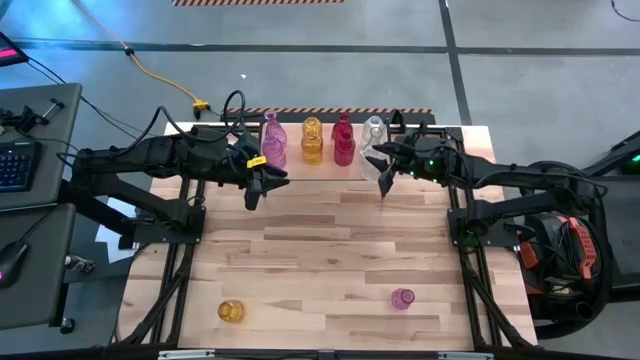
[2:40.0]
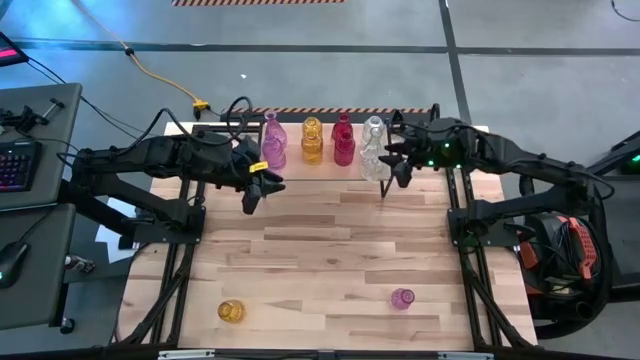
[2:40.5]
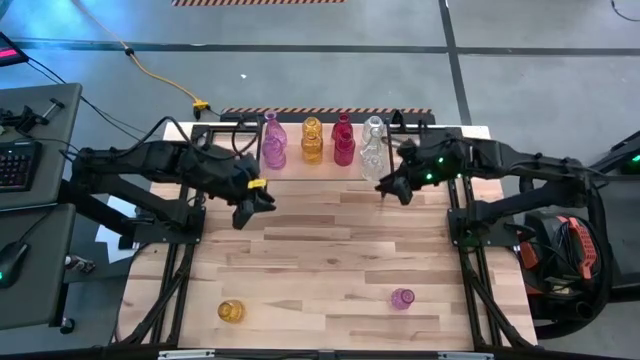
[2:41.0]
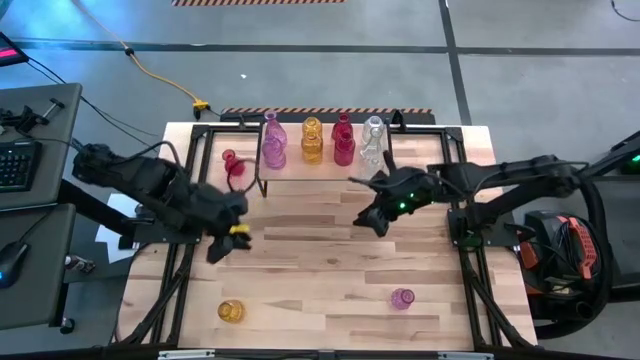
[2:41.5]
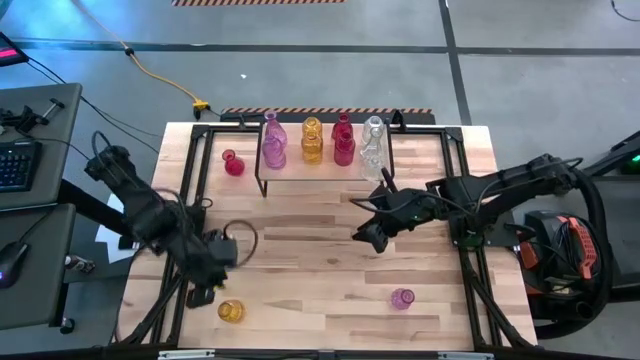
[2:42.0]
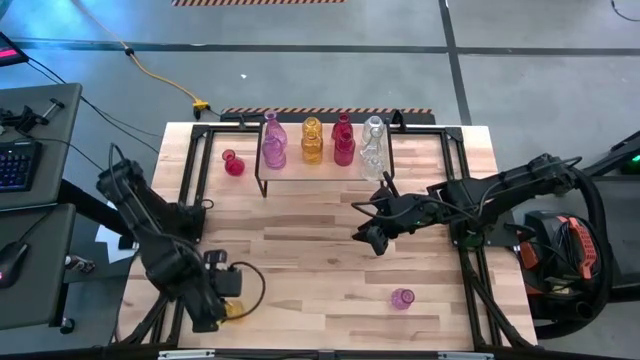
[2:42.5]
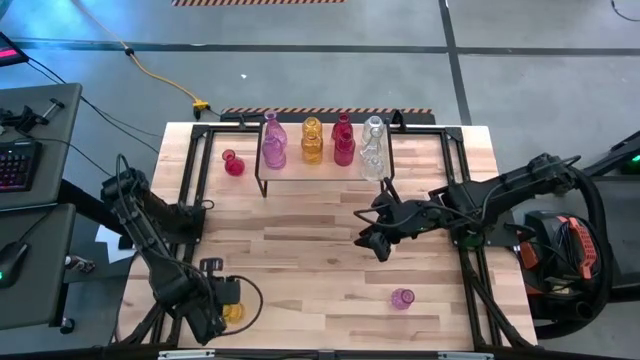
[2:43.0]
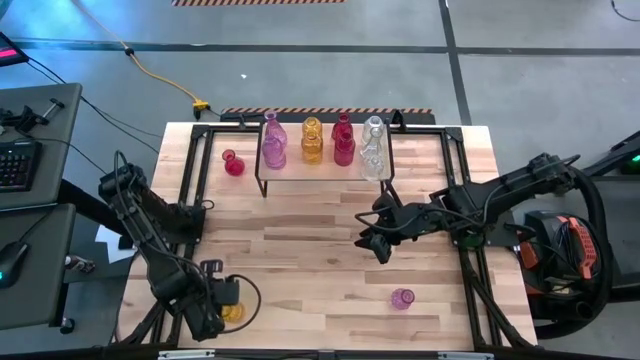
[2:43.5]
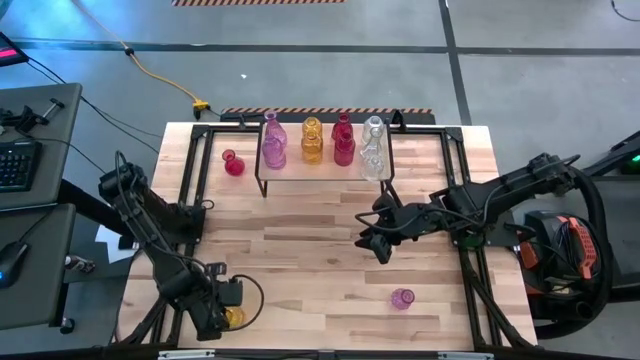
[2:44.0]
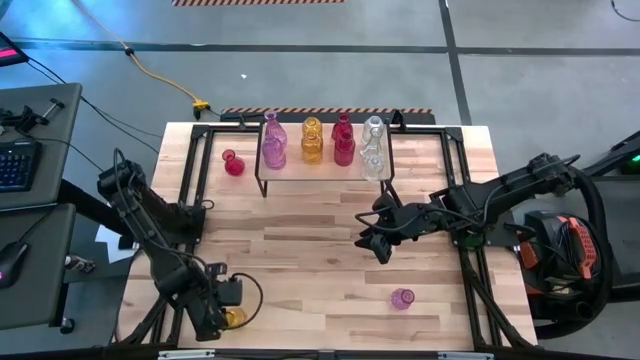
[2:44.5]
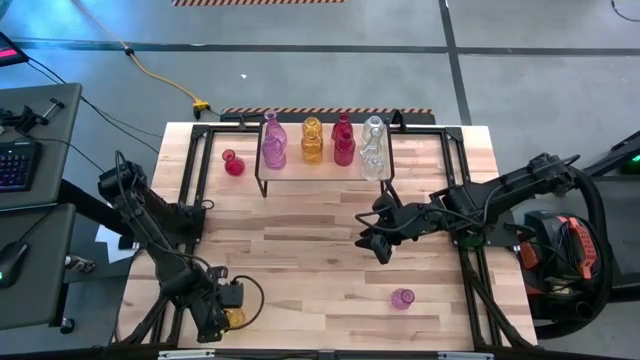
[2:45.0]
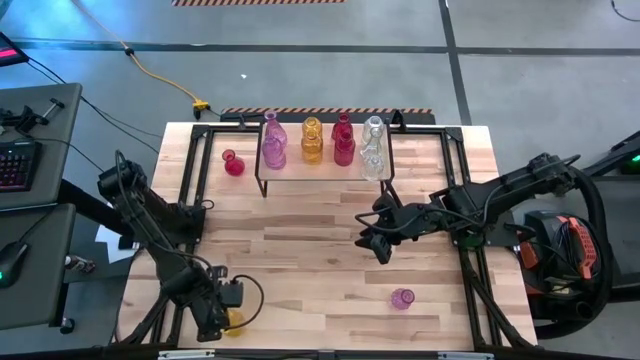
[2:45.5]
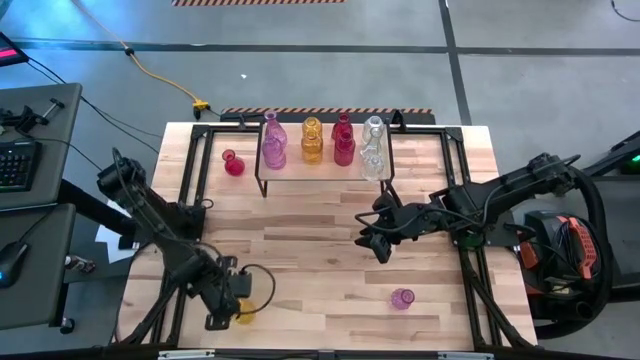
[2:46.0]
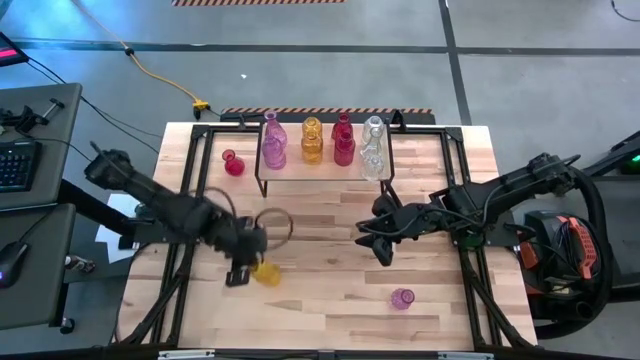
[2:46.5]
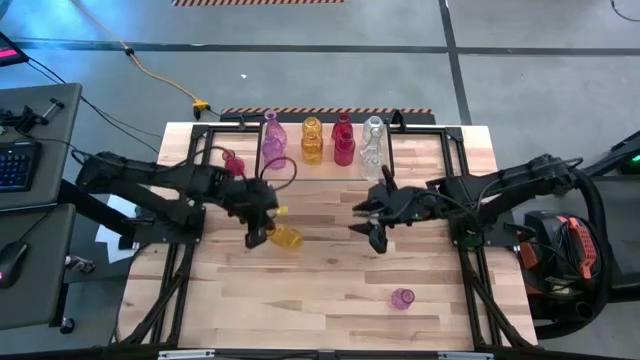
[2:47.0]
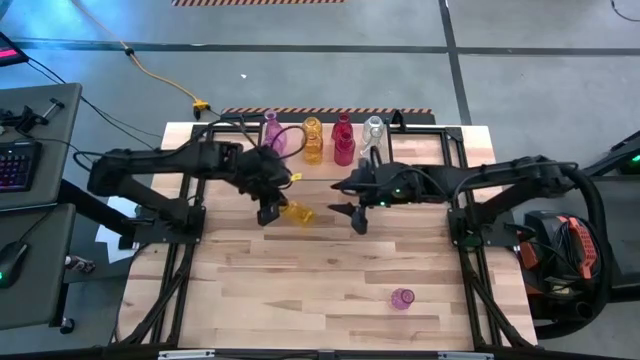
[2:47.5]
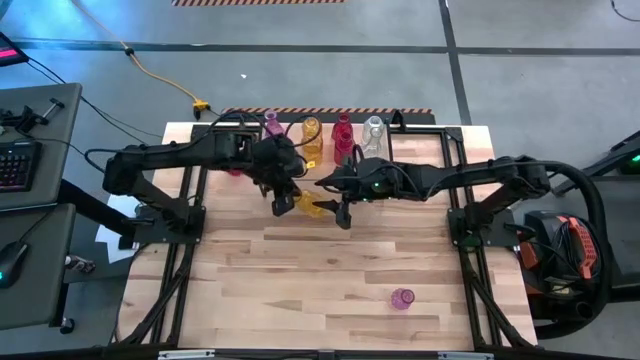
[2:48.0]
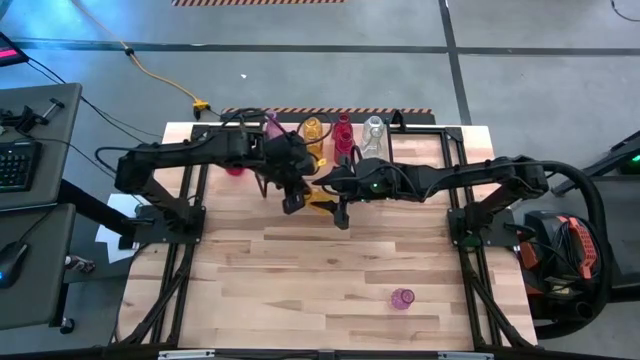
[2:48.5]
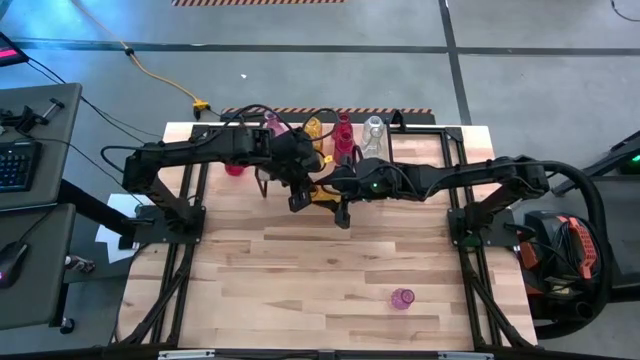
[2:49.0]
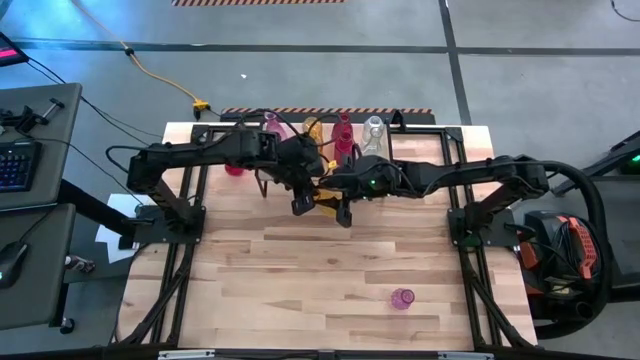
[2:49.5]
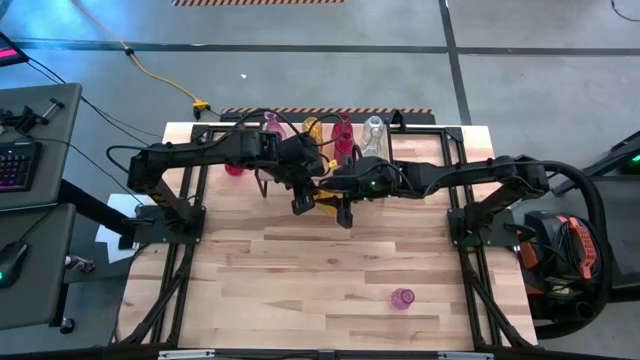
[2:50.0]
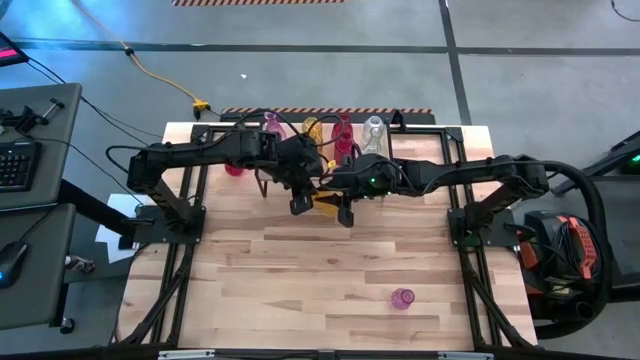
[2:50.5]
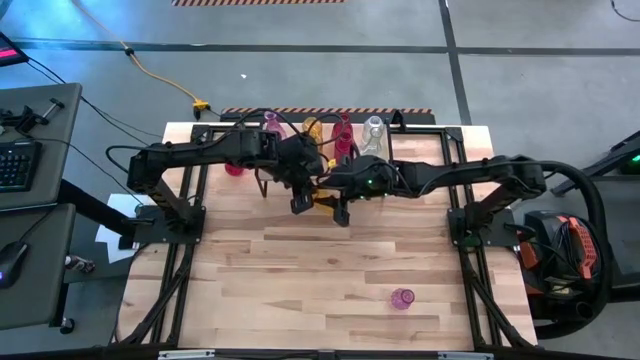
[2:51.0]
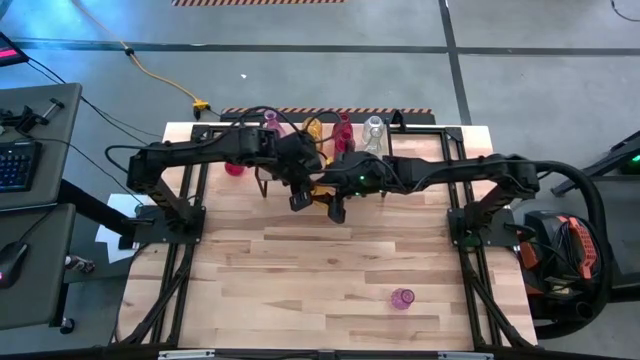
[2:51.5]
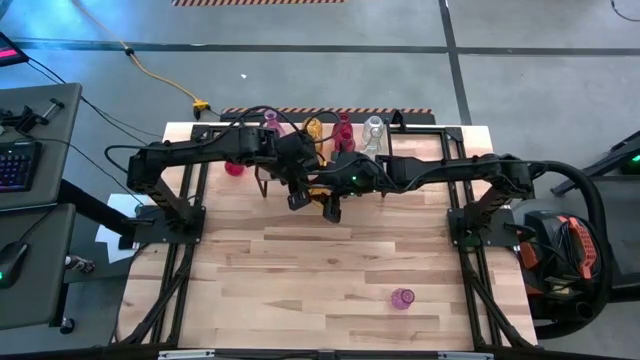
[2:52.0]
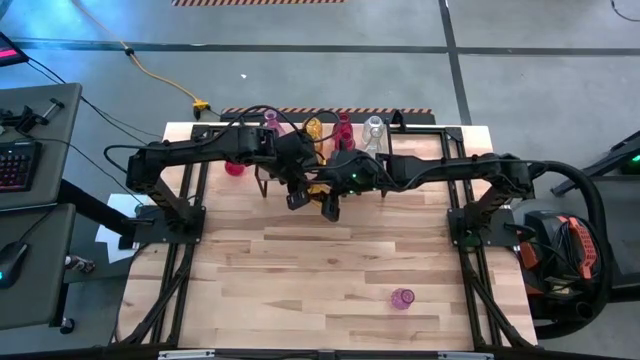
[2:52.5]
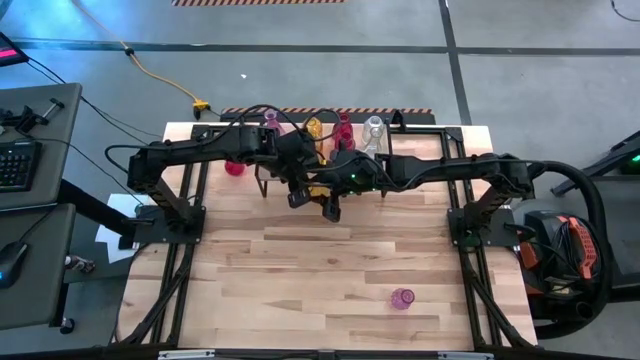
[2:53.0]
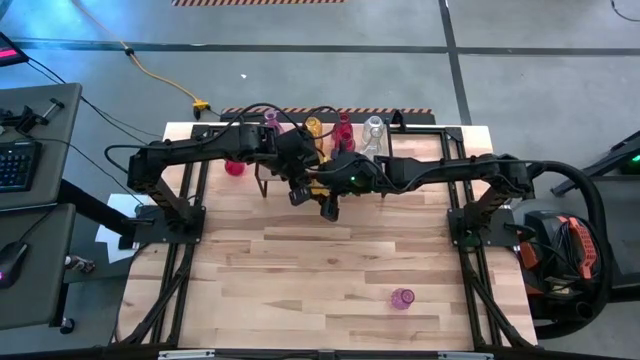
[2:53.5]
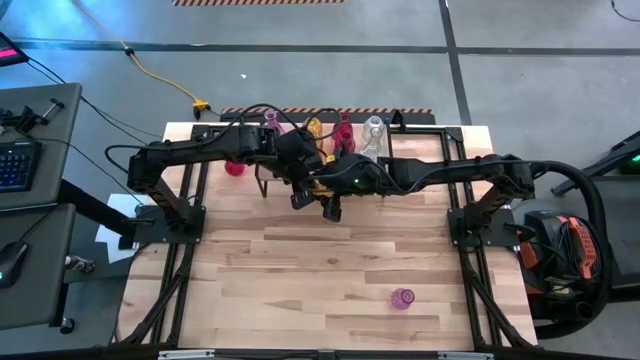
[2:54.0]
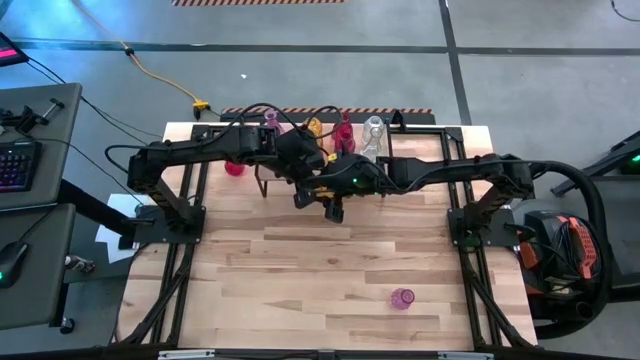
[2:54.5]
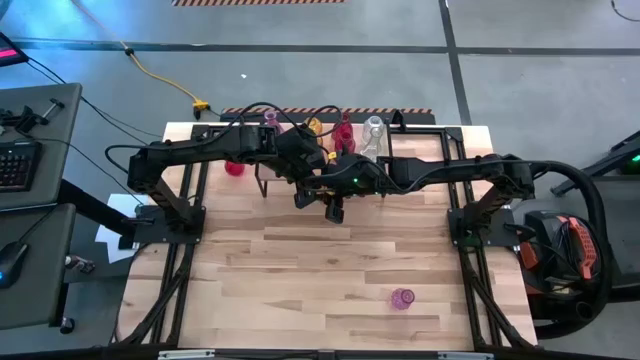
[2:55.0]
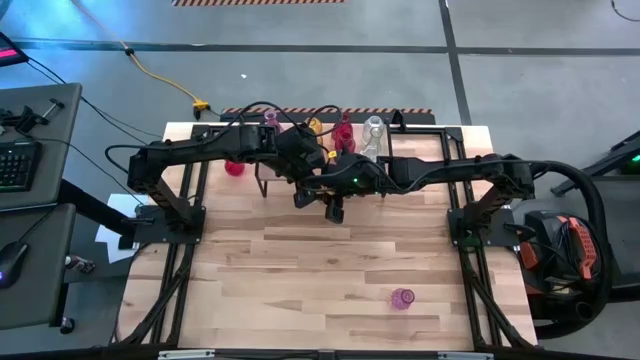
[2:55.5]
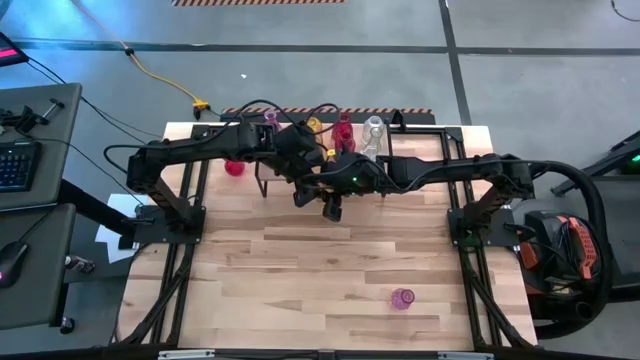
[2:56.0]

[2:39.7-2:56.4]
Task: sort vases onto shelf
Put the yellow vase on the shelf aligned with the other yellow vases

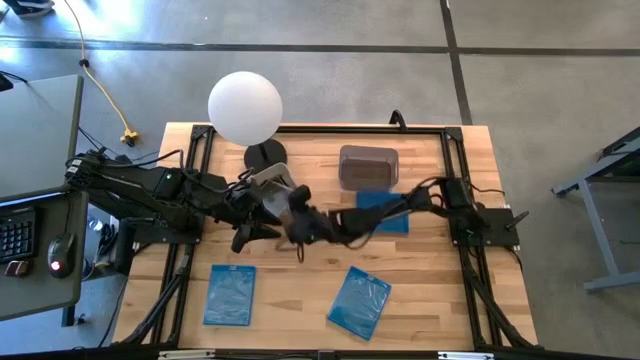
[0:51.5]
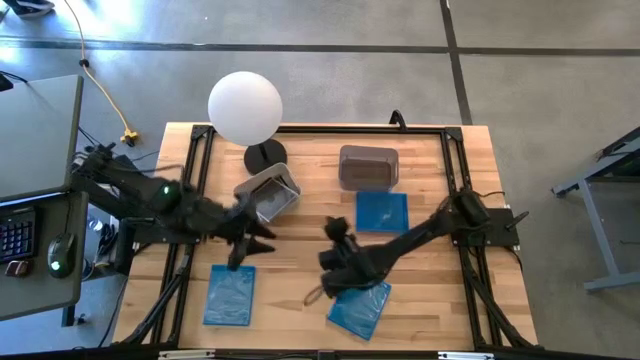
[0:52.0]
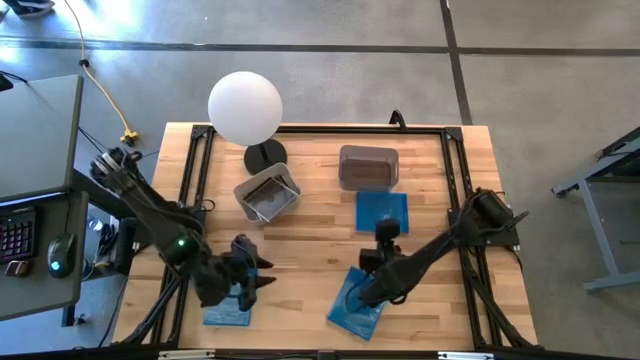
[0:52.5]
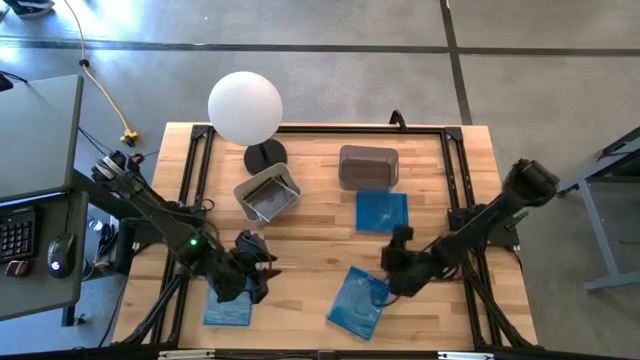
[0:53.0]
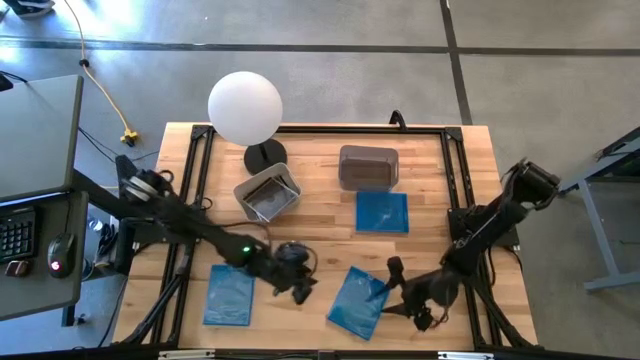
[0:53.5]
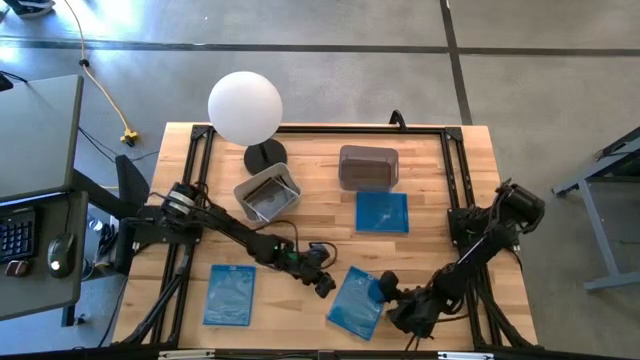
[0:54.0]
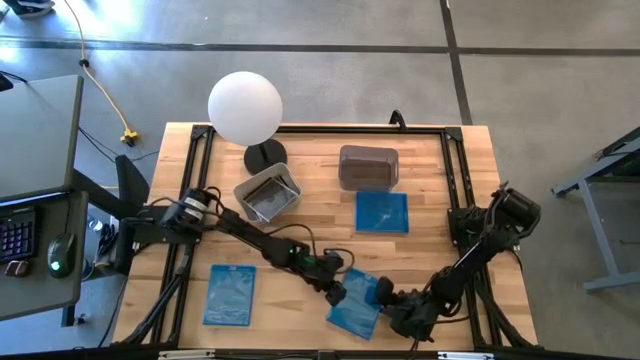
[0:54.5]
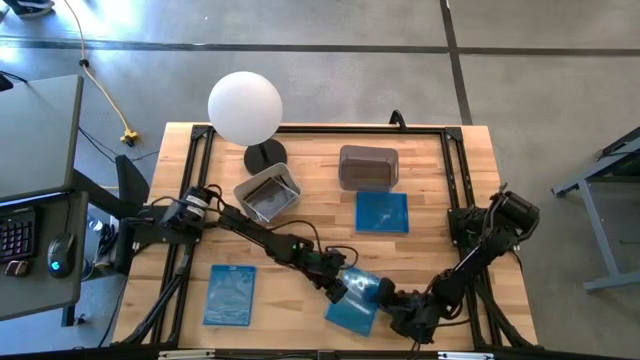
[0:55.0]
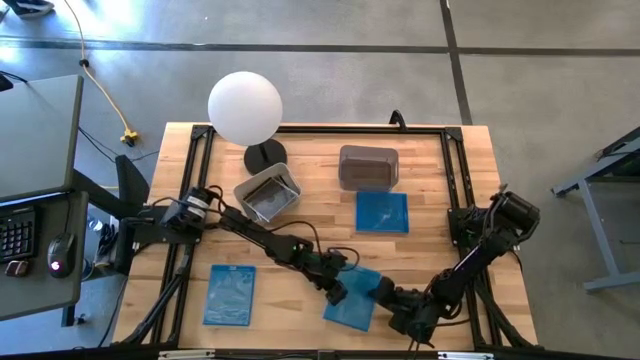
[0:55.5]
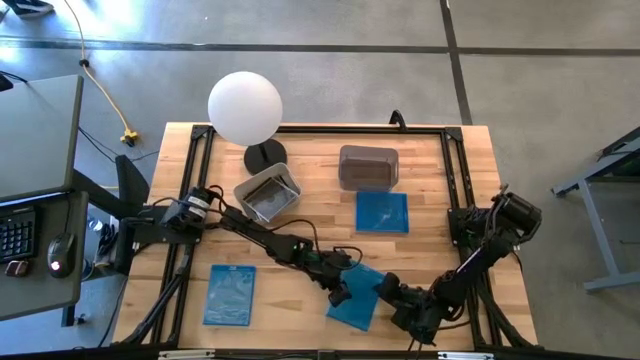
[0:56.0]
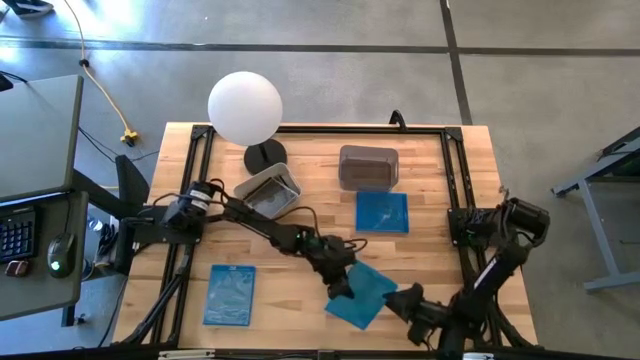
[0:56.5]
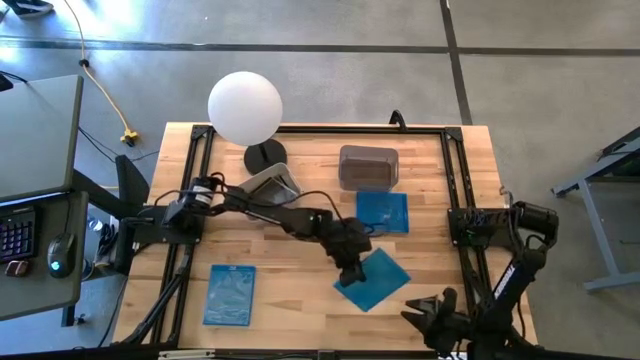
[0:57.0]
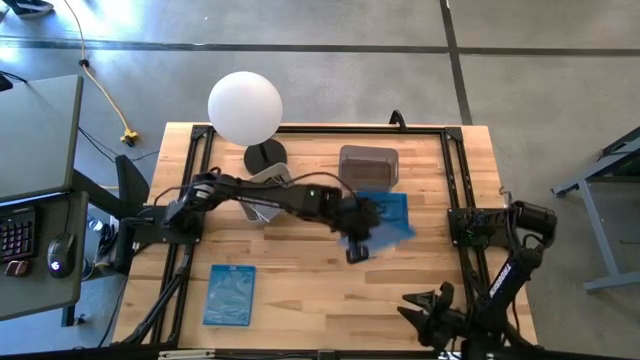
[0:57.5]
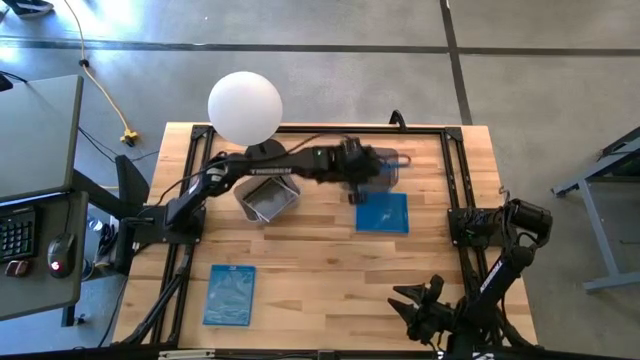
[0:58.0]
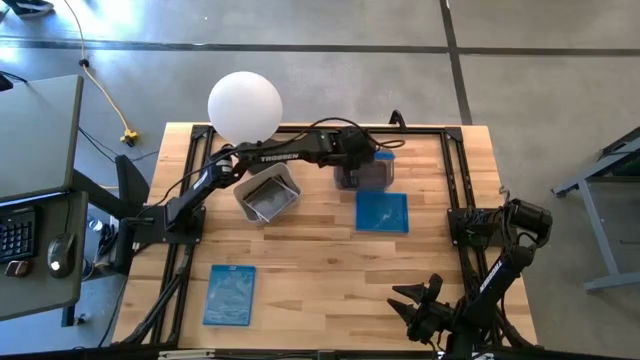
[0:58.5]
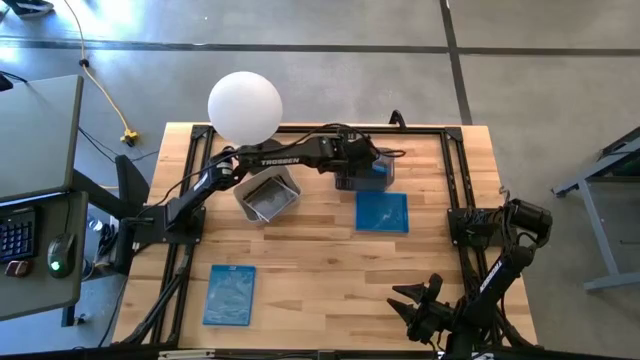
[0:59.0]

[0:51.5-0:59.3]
Task: Pick & place jewel cases by type
Put the bottom right blue CD case into the black bin
